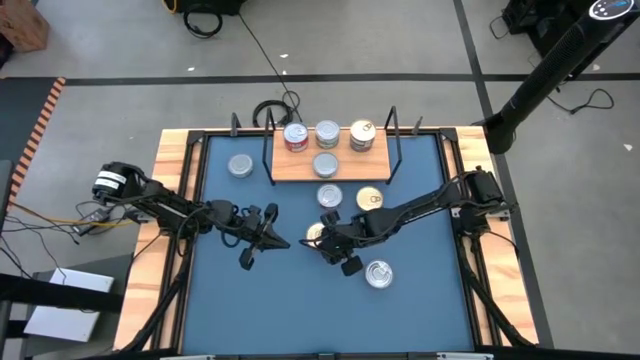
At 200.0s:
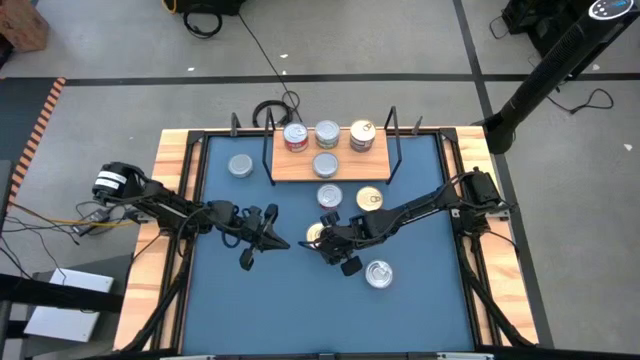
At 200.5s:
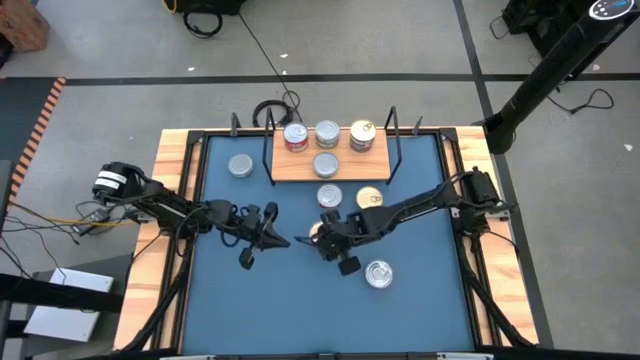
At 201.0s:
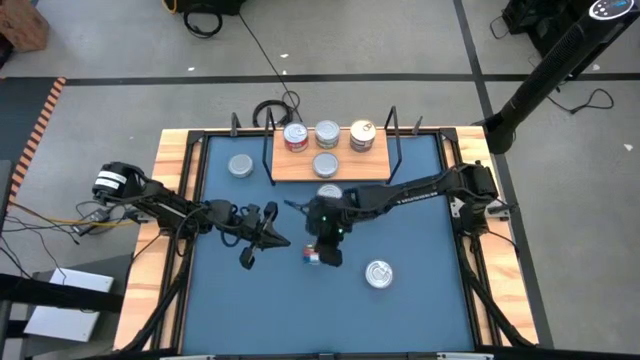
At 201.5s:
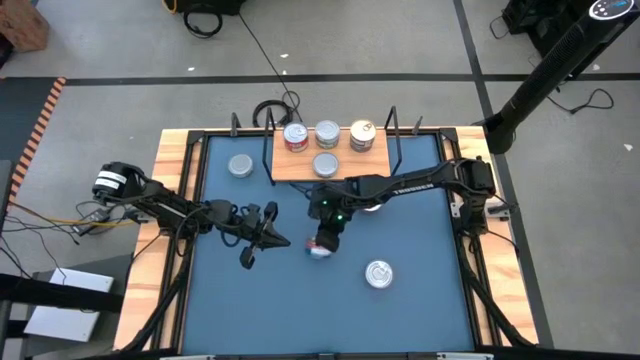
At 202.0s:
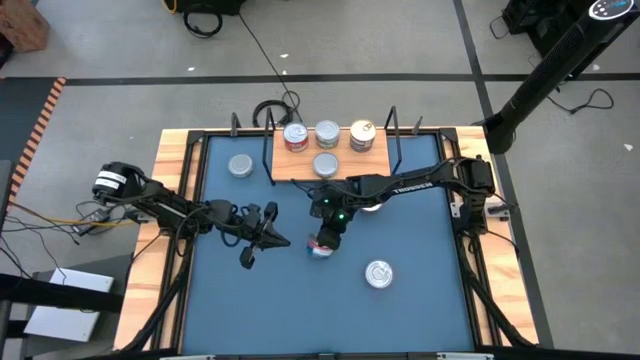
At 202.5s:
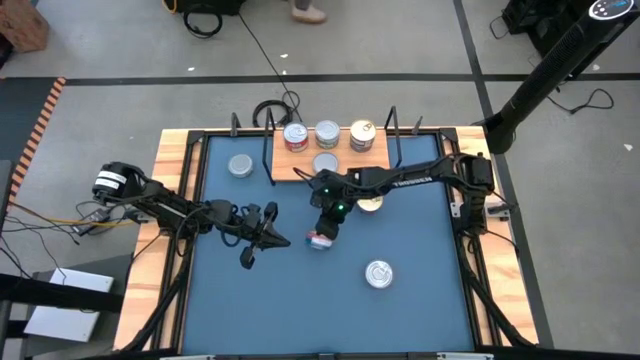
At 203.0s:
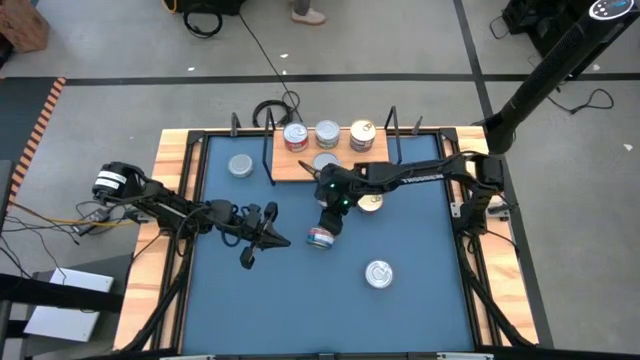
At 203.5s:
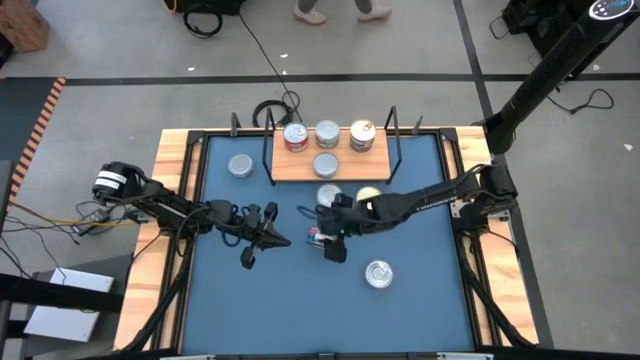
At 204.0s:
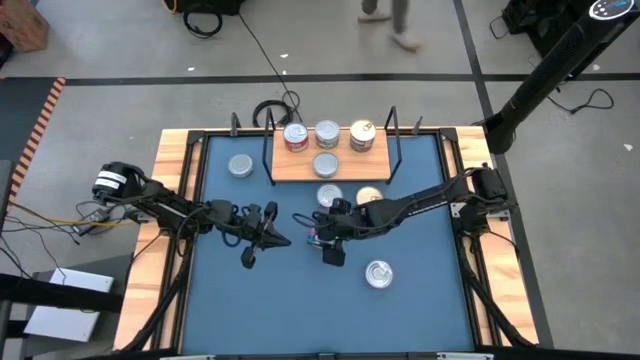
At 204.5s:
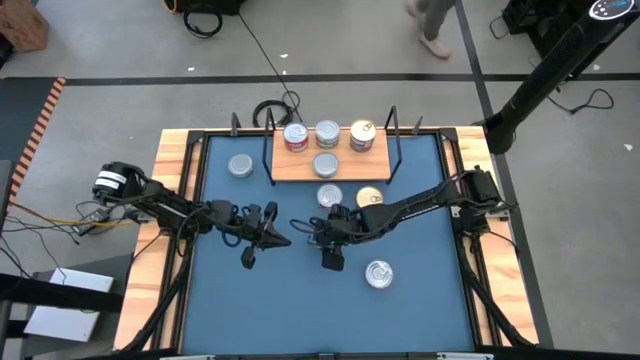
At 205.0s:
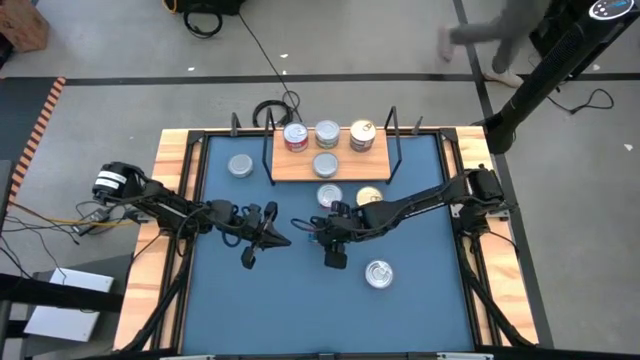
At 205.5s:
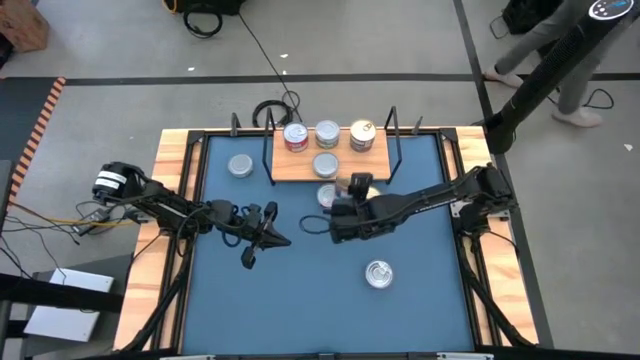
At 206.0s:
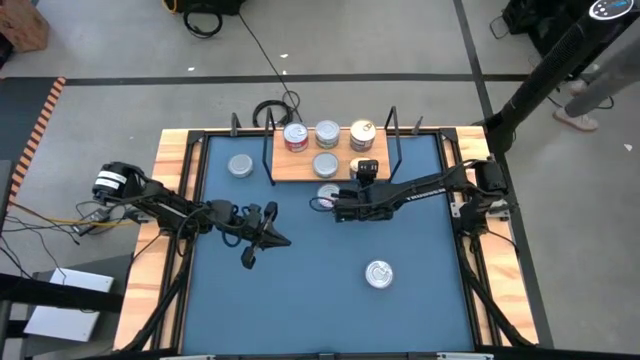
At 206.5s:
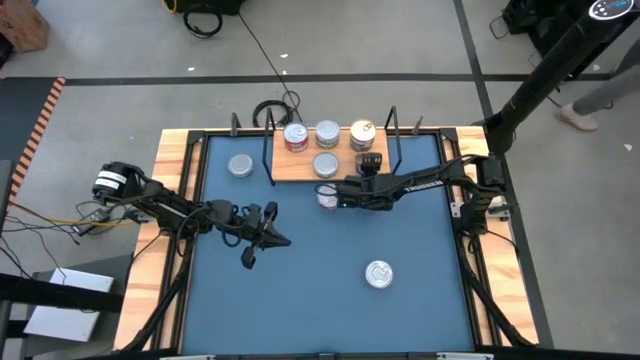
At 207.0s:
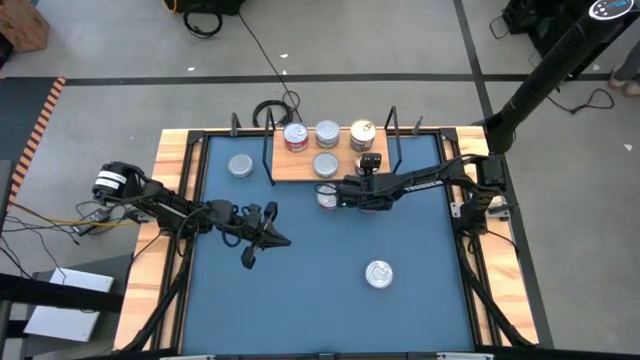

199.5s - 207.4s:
Task: Stack canned seafood by type on shelf
Put the blue tuna can aligned with the stacked blue tuna can on the shelf

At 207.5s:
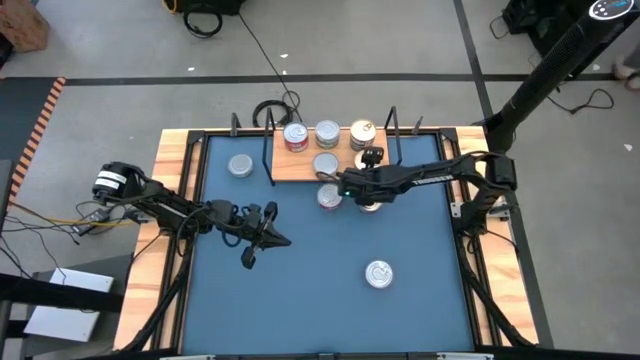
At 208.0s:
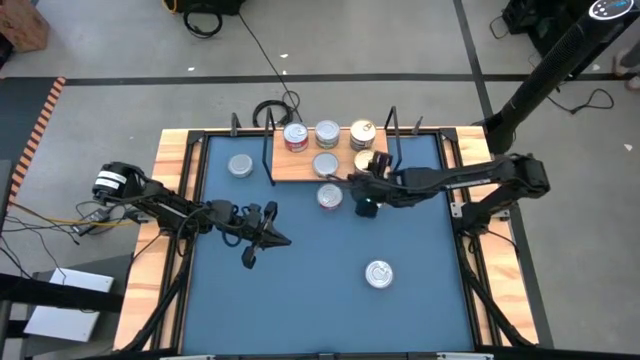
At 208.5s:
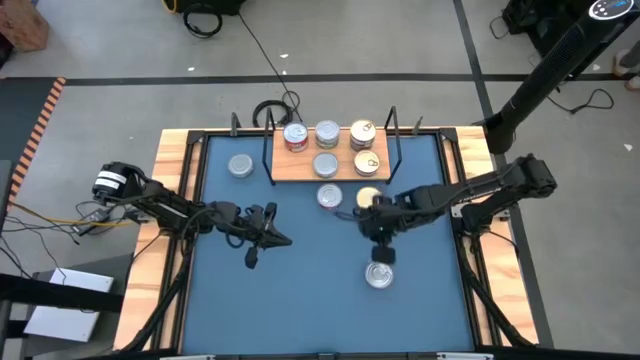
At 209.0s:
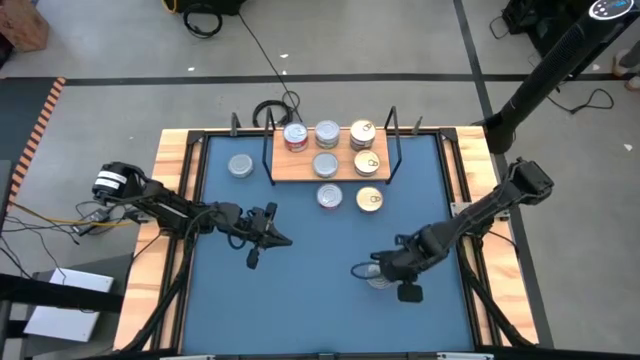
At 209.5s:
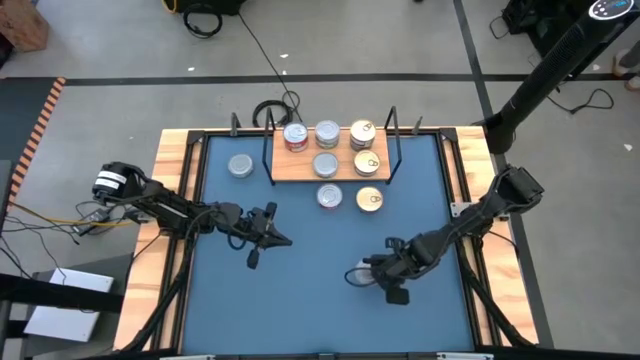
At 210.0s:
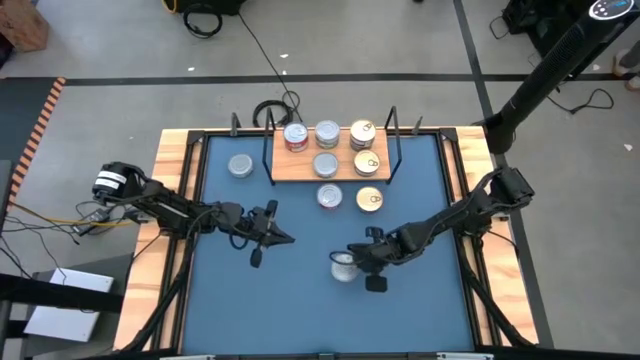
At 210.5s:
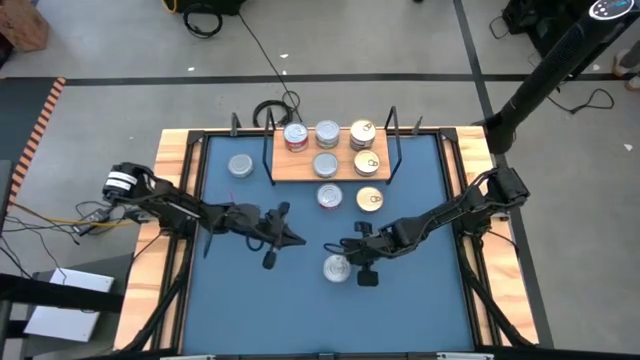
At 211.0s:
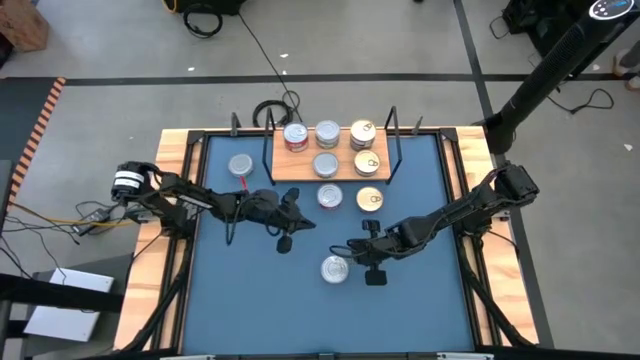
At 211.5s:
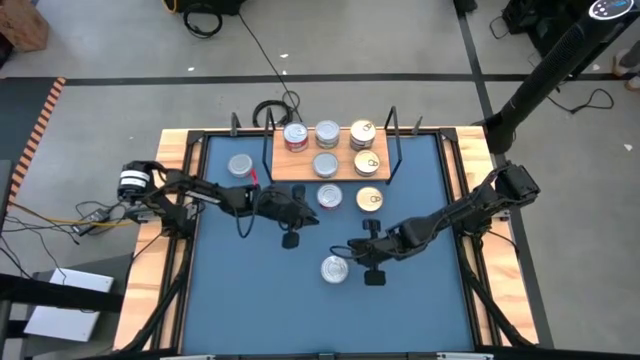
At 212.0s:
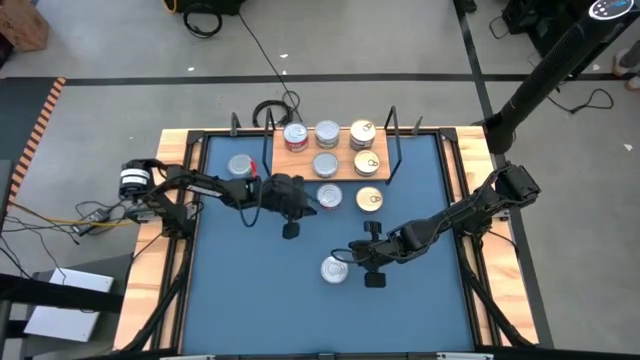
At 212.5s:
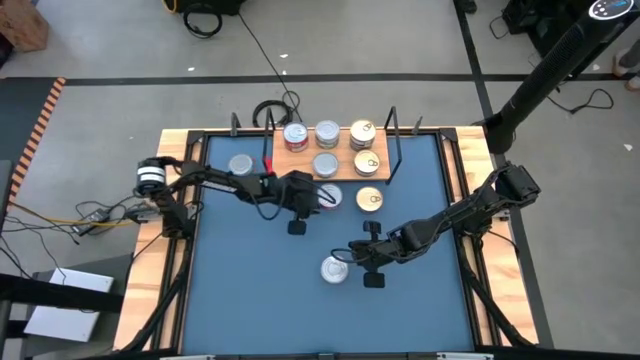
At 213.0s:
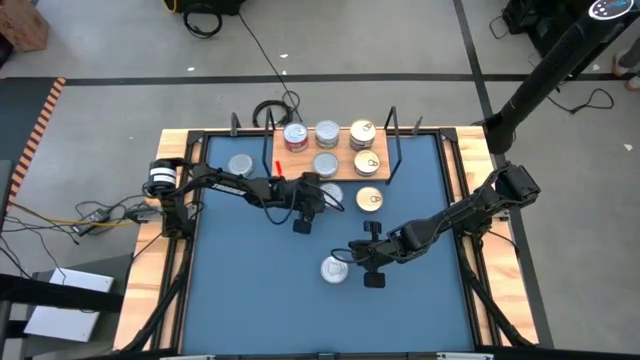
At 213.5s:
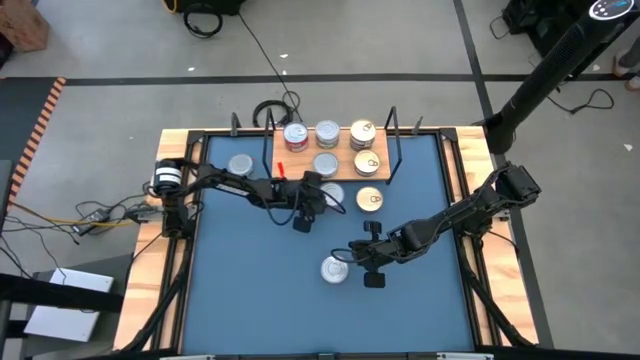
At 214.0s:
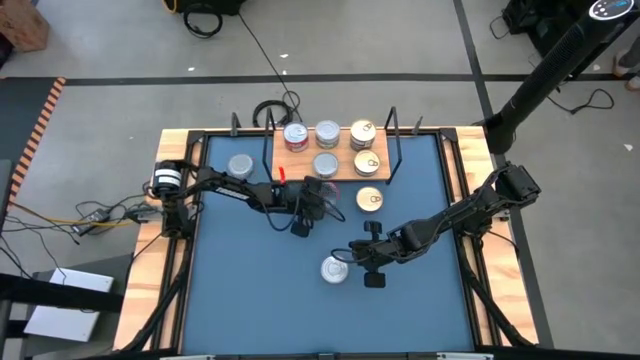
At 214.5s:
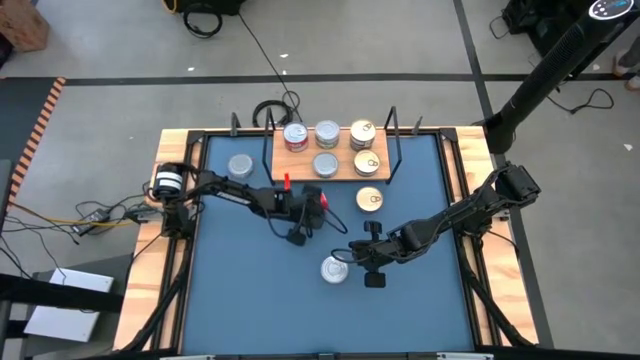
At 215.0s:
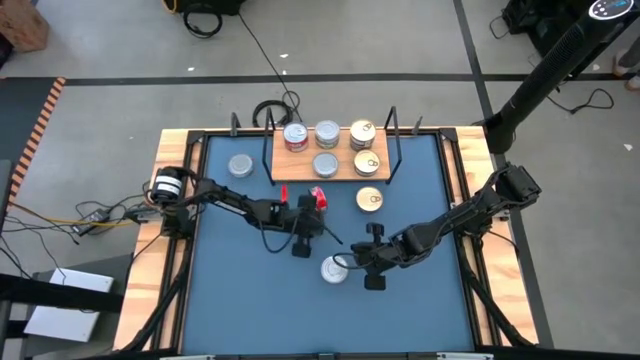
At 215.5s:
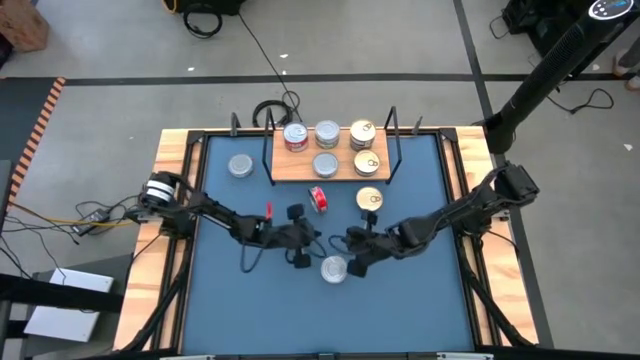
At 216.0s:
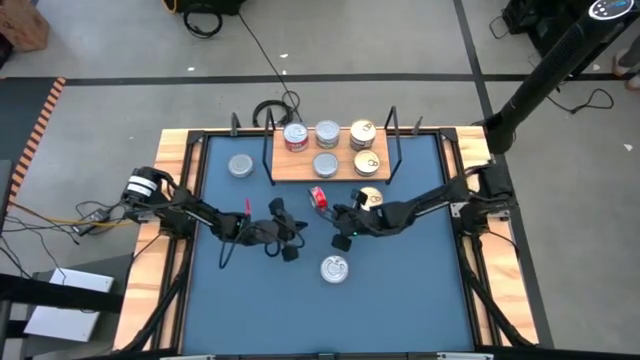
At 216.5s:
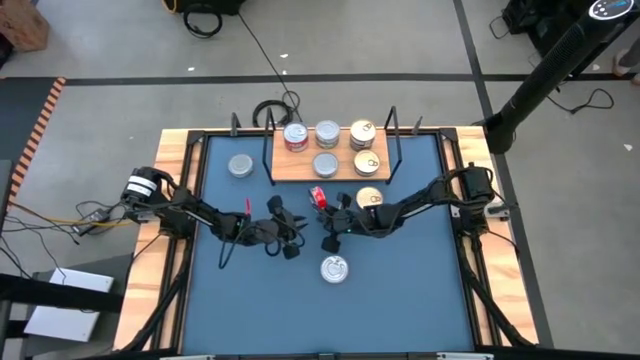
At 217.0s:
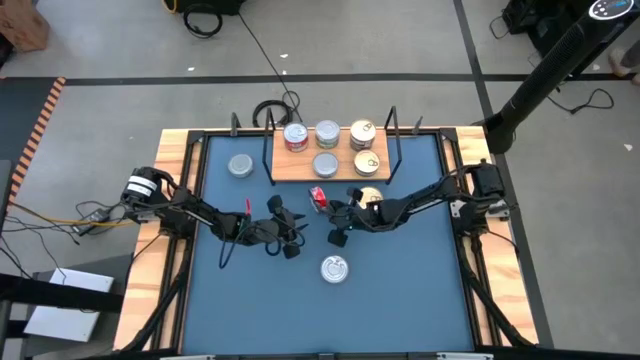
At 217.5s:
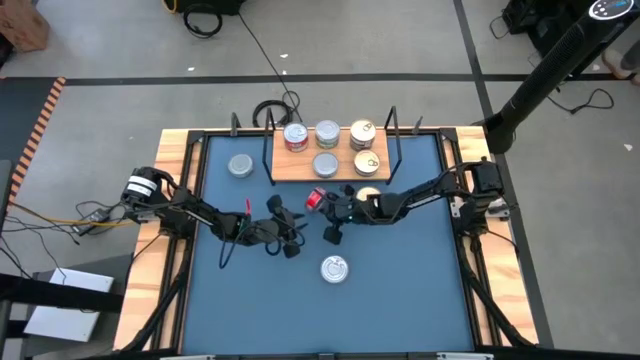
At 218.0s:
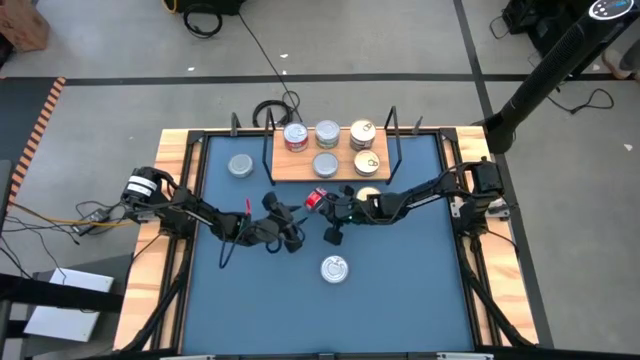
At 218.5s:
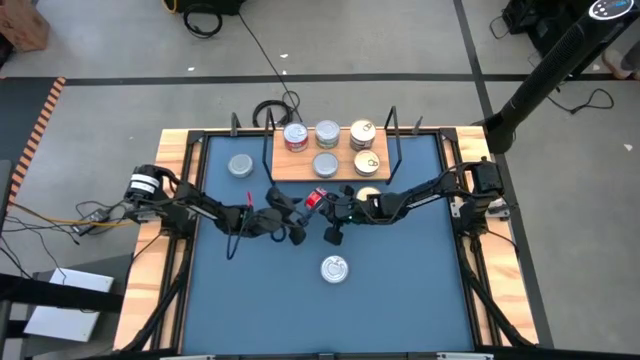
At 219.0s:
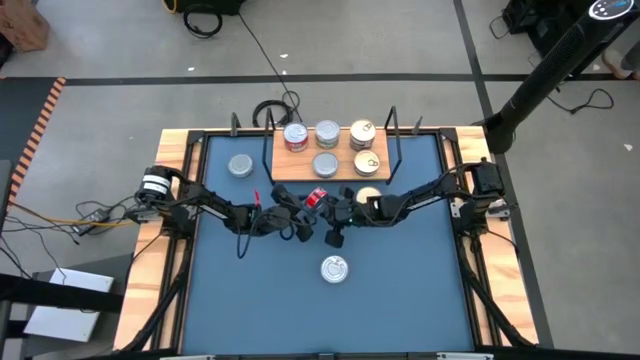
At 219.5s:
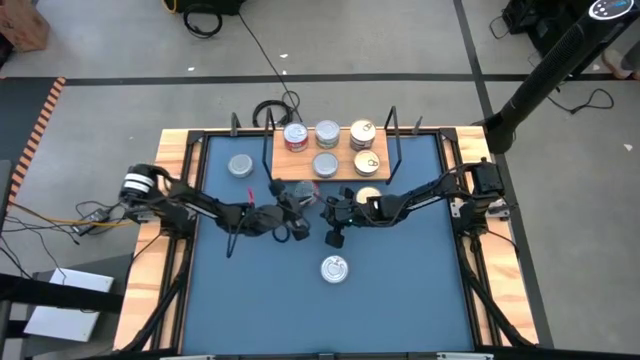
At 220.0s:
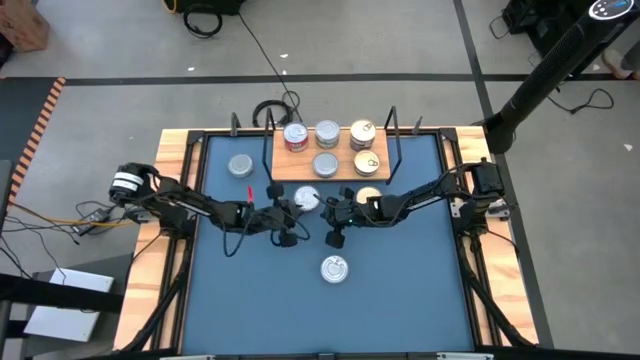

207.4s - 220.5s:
Put the red tuna can aligned with the stacked red tuna can on the shelf
